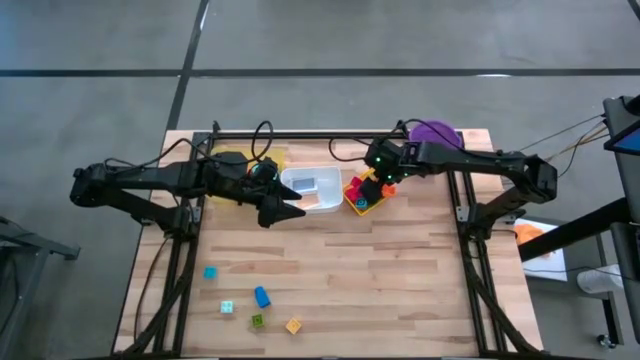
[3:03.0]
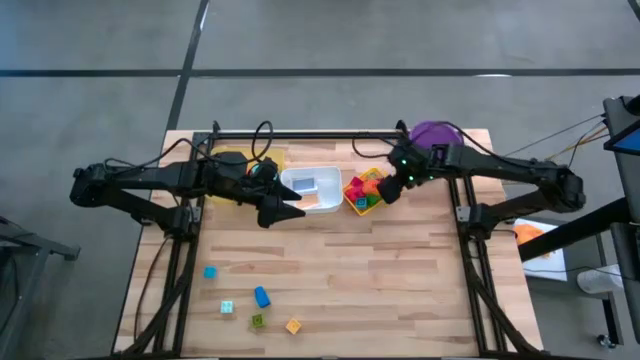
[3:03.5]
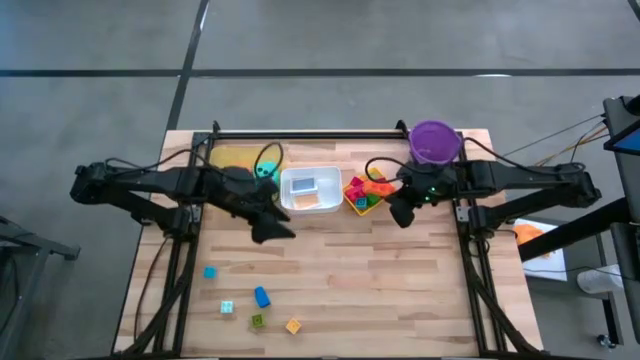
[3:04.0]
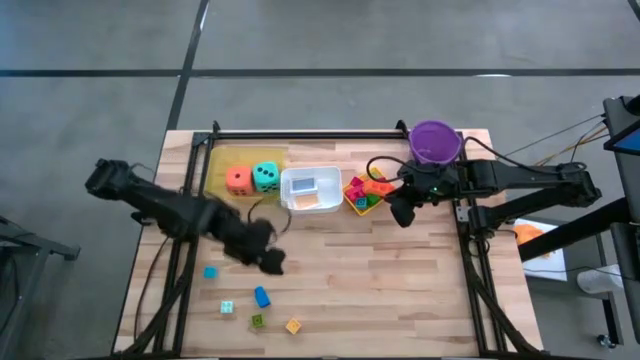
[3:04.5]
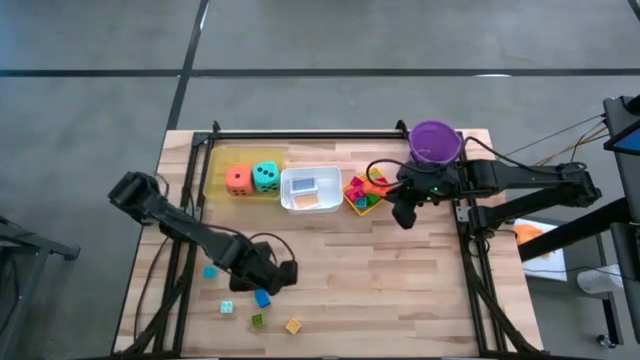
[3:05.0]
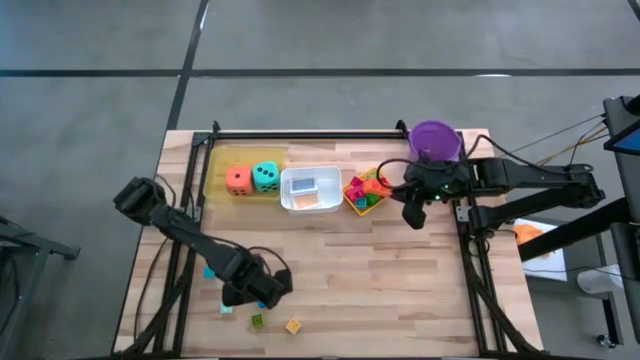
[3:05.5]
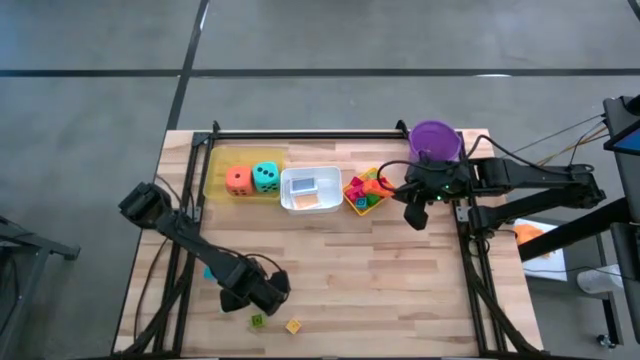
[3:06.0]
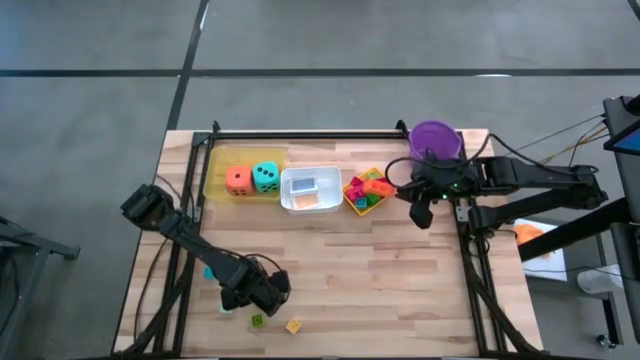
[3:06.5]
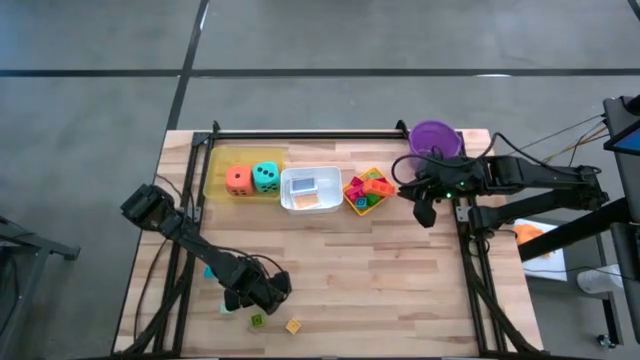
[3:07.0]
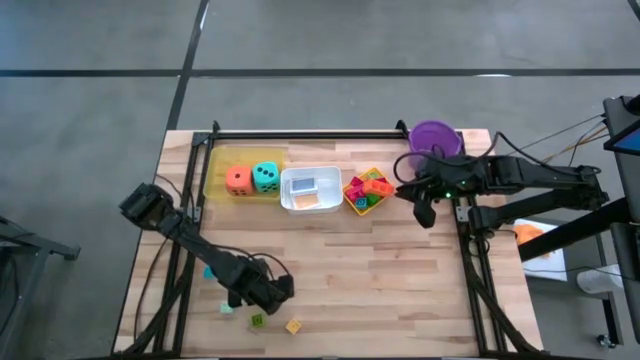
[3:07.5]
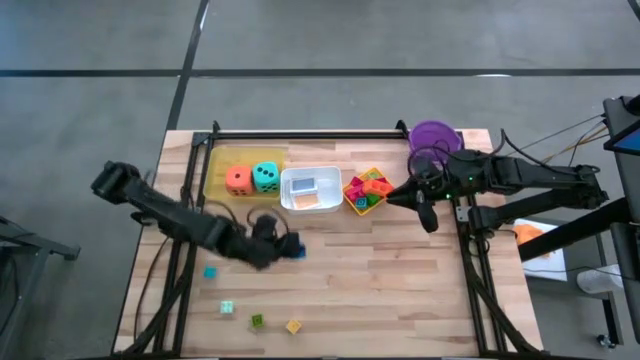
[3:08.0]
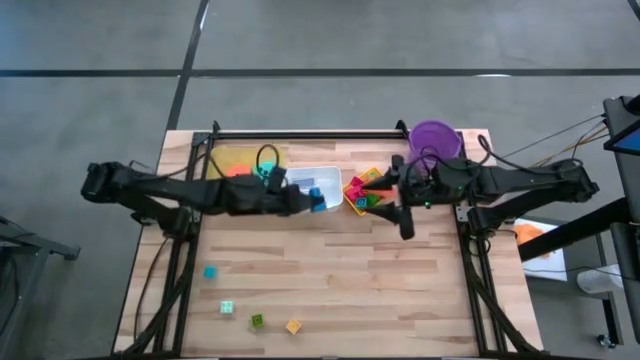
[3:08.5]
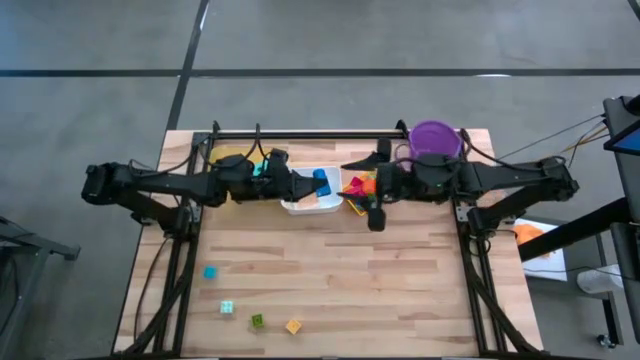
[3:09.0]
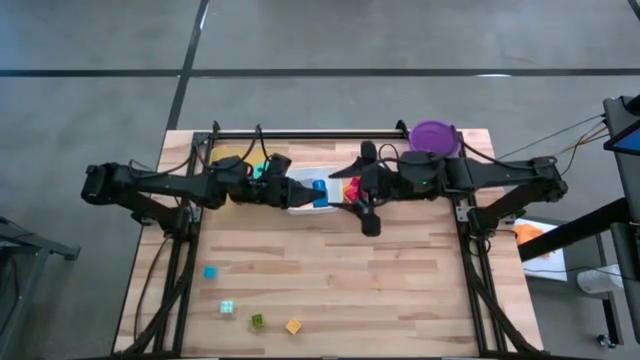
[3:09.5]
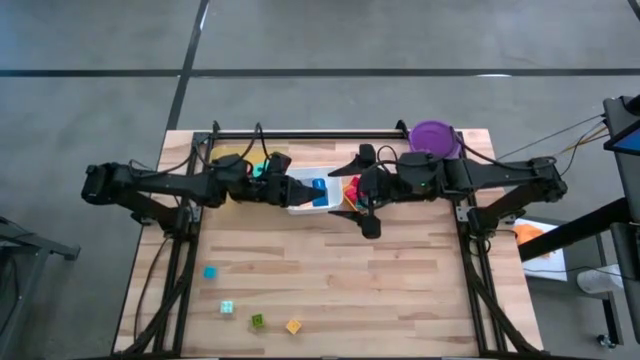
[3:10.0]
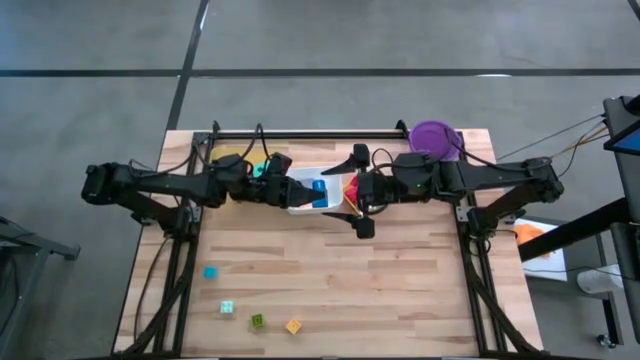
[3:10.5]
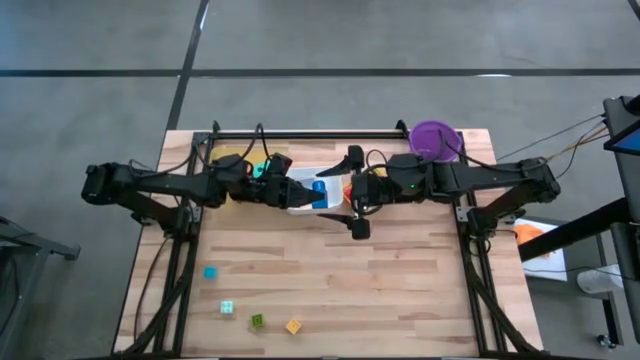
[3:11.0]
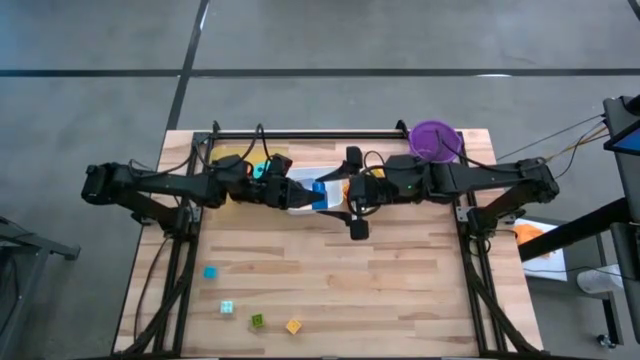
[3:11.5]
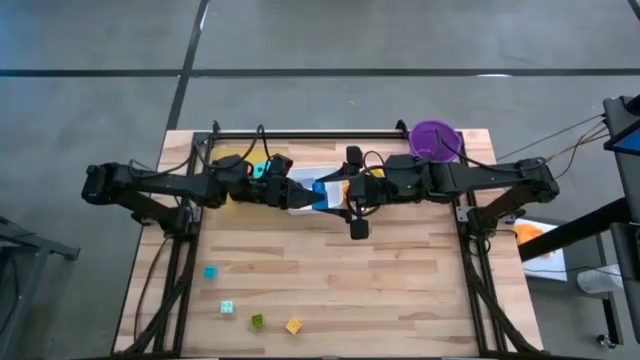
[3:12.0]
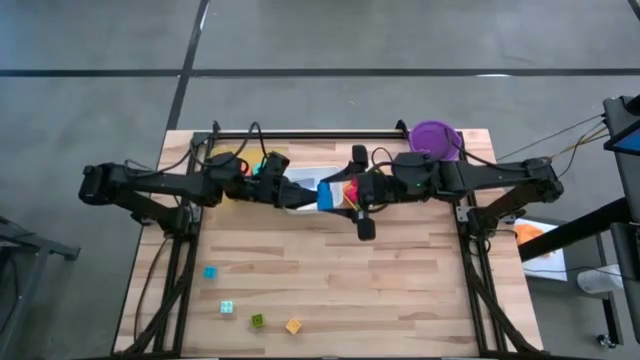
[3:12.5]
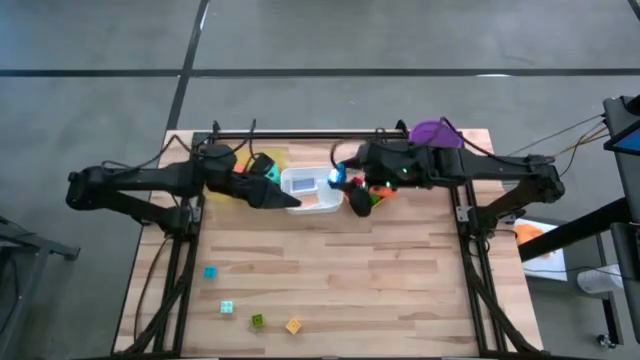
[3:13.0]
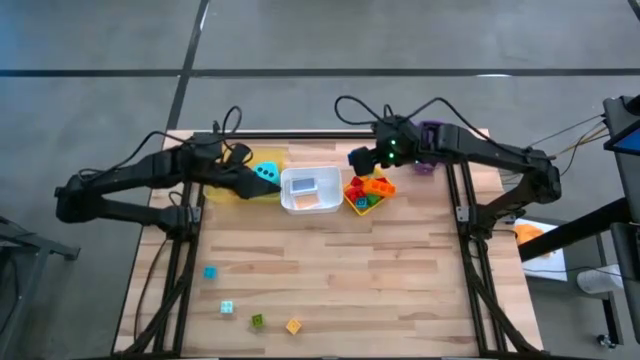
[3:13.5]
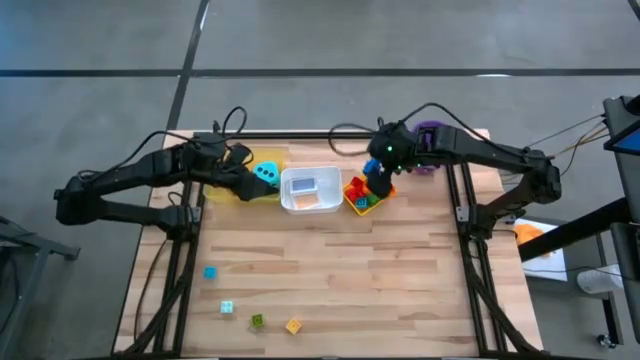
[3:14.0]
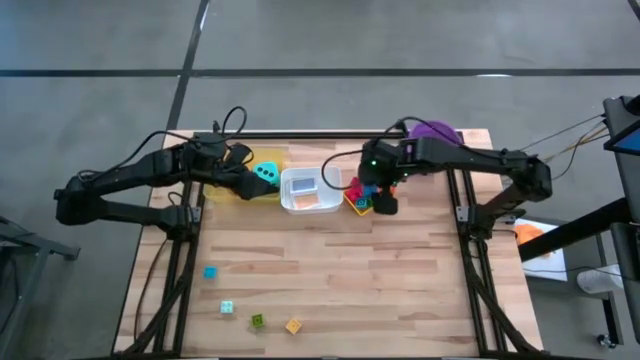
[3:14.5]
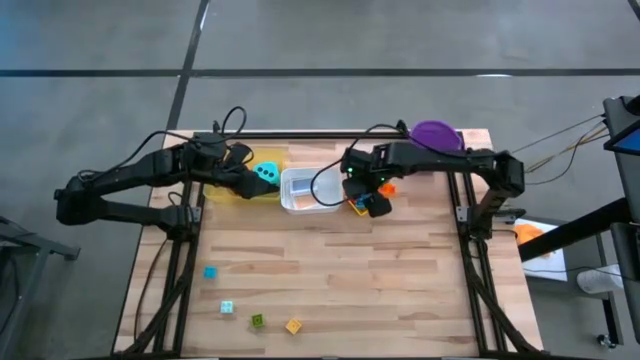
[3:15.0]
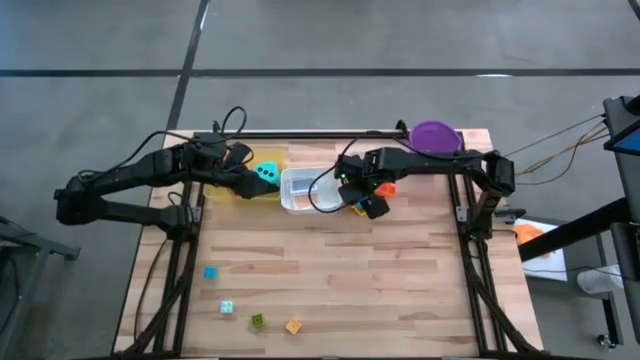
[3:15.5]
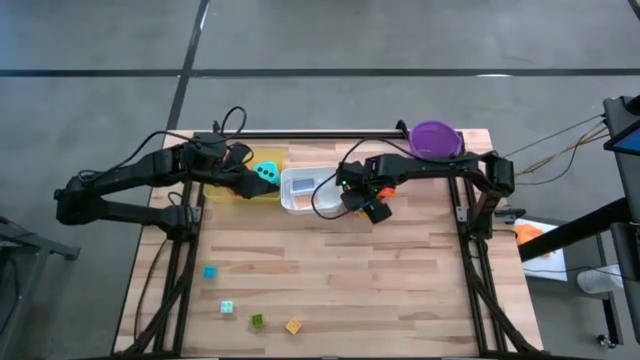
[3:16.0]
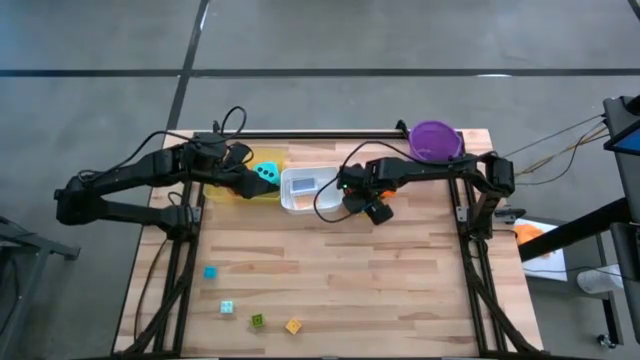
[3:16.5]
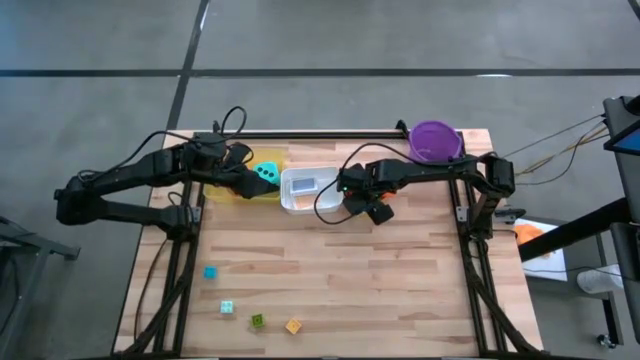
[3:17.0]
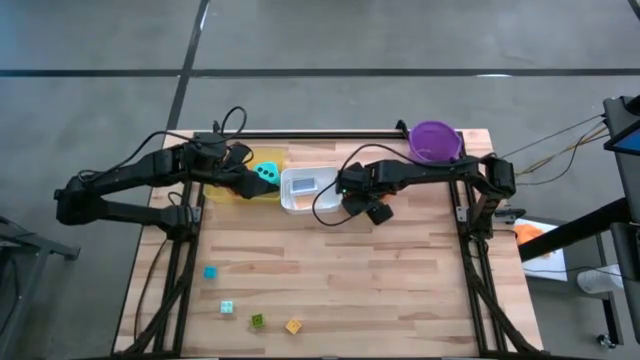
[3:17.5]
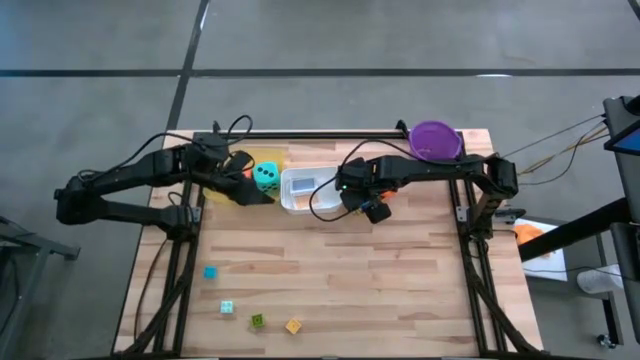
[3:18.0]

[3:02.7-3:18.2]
Task: Pick & Place Toys
Put the blue game piece into the yellow bin

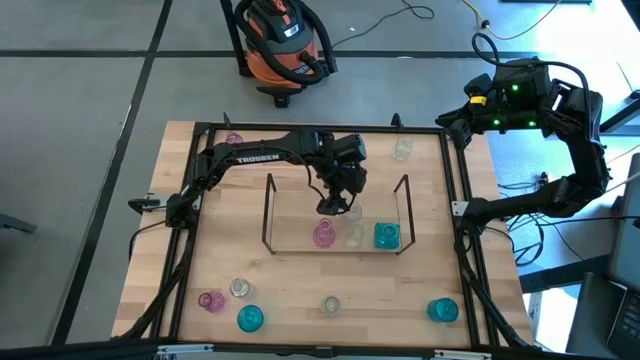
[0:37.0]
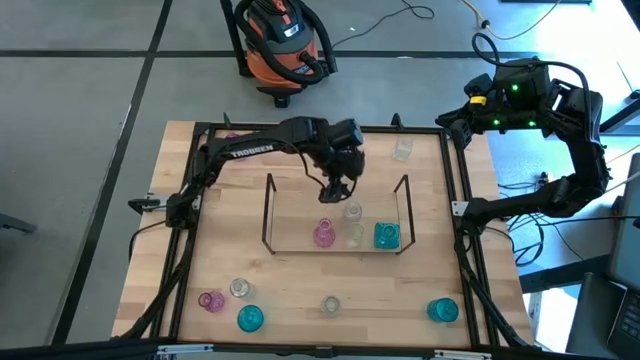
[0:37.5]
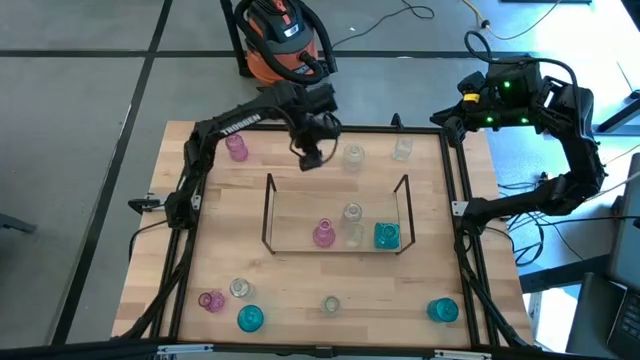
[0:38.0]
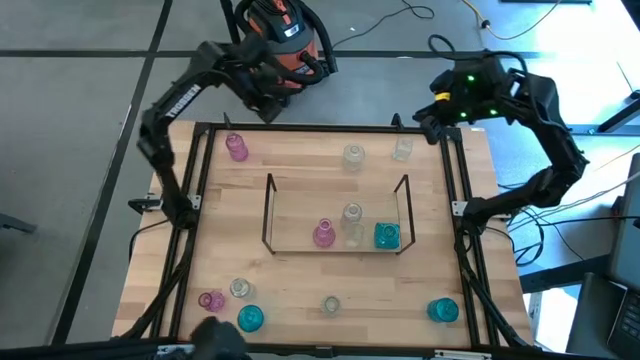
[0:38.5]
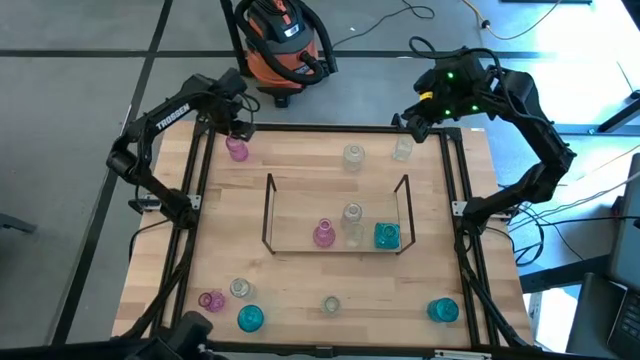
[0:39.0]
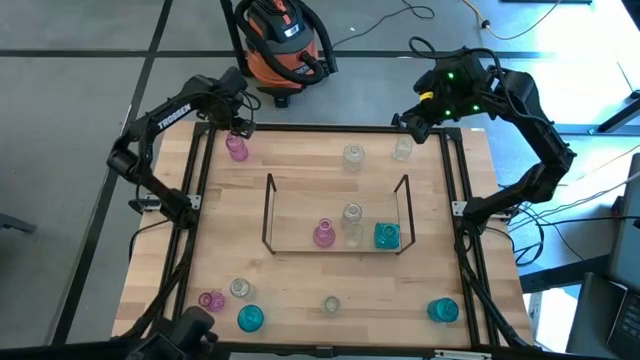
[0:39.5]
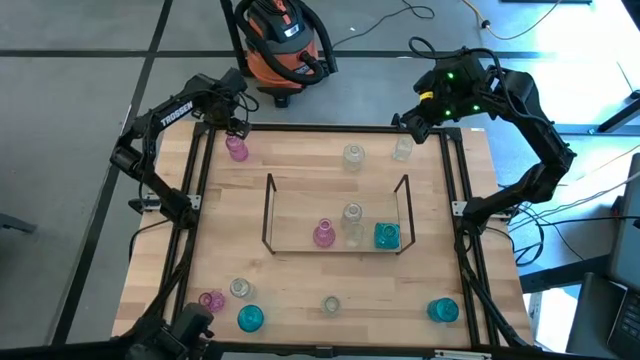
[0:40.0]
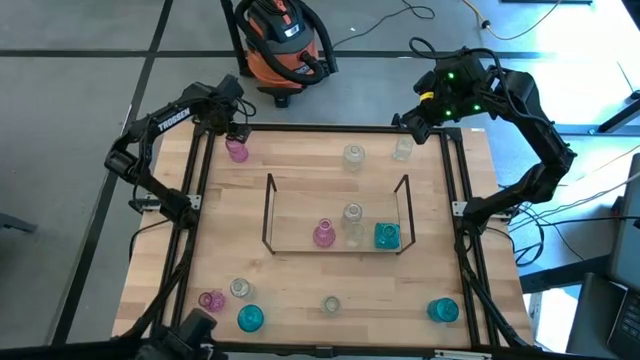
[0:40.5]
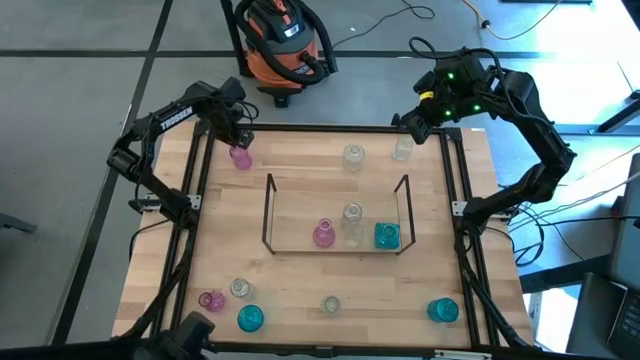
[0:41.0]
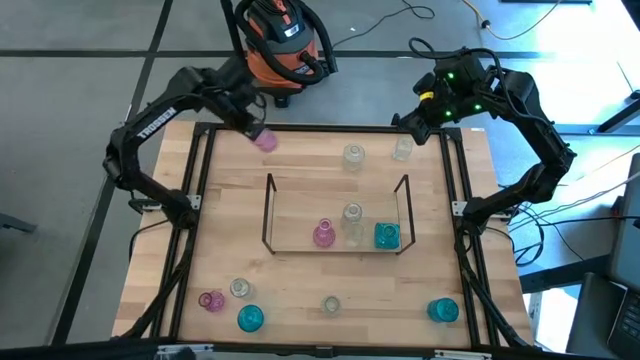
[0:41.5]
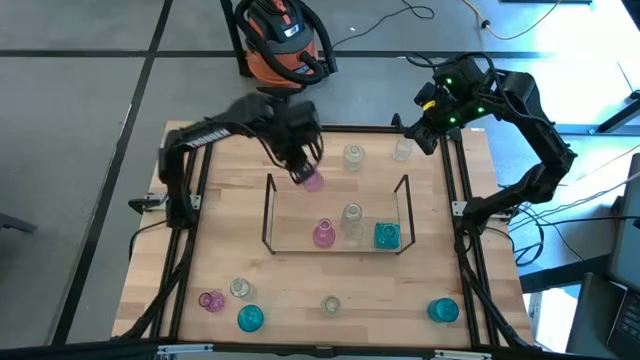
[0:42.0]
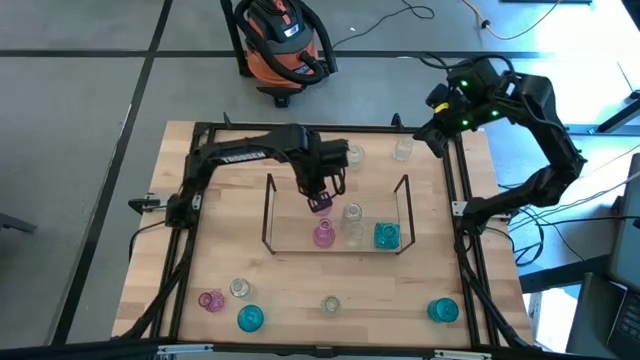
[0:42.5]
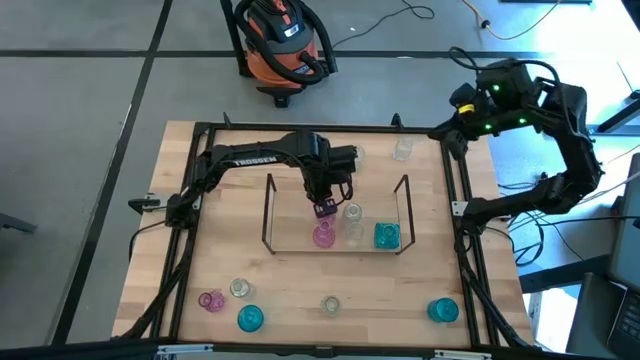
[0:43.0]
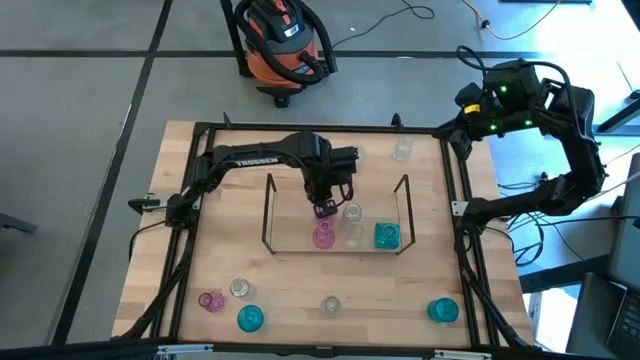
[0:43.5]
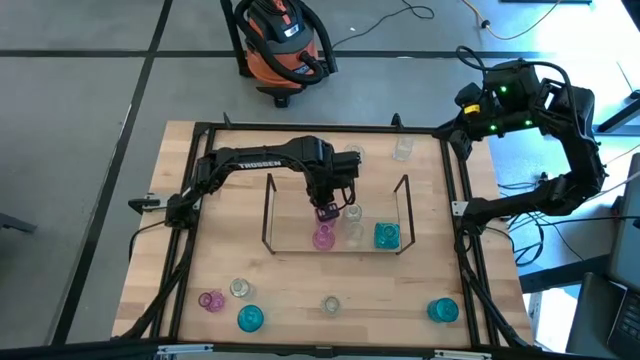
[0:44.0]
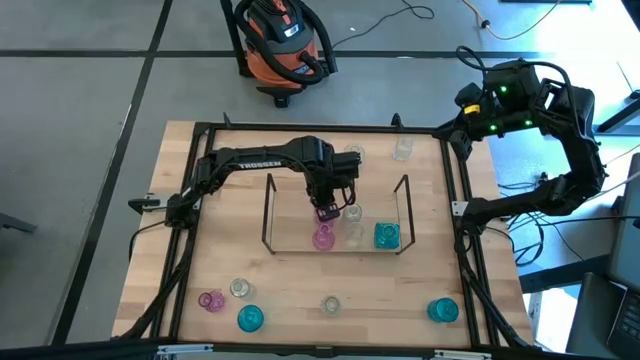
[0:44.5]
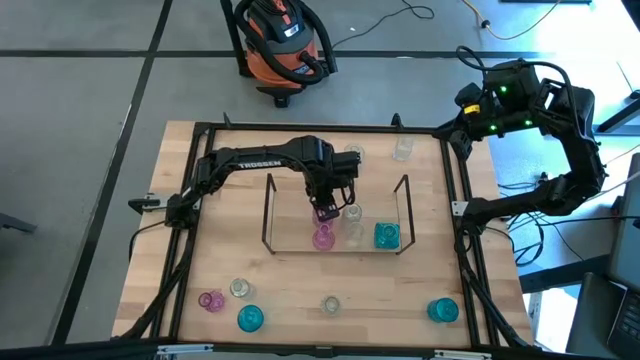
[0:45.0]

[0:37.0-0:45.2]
Task: sort vases onto shelf
Put the violet vase aligned with the other violet vase on the shelf
